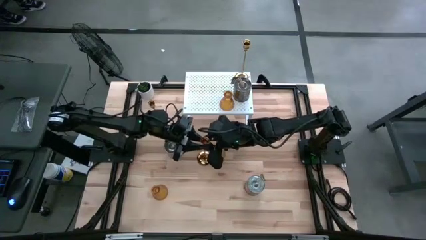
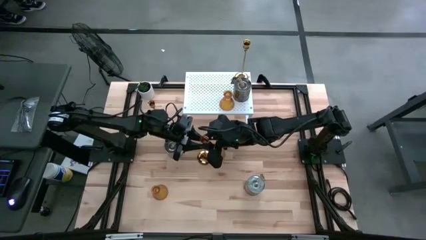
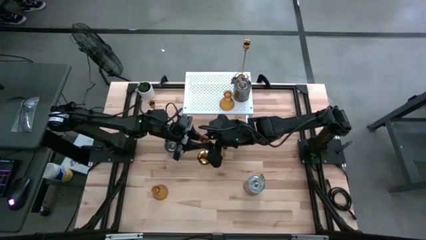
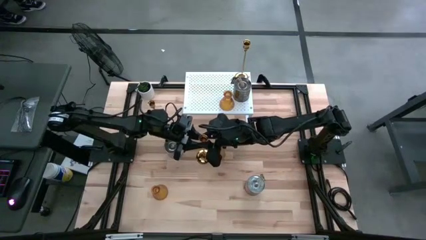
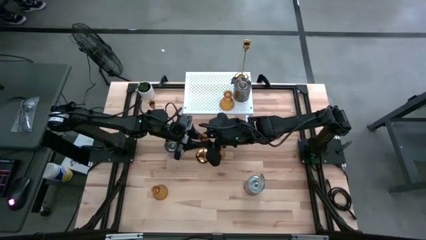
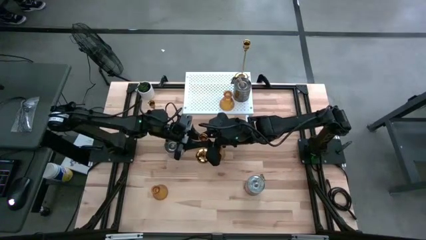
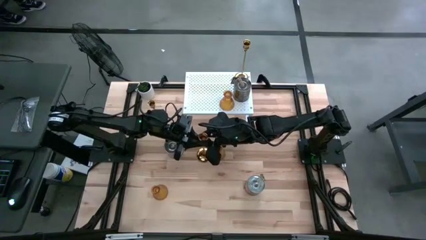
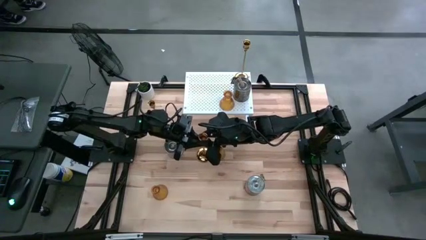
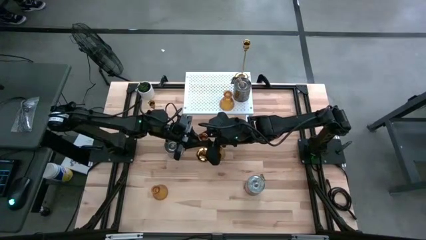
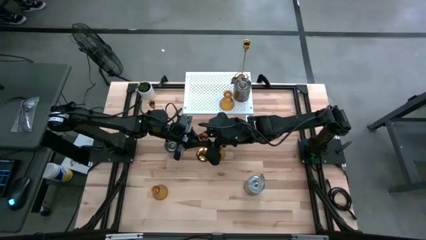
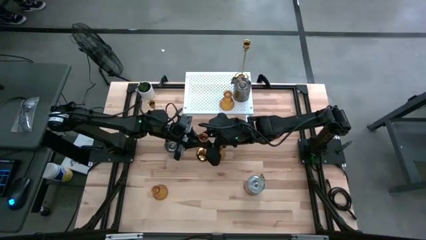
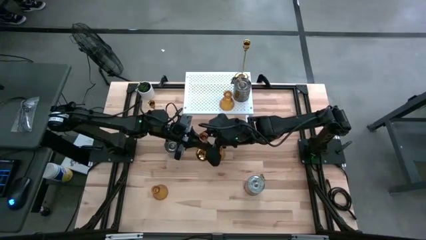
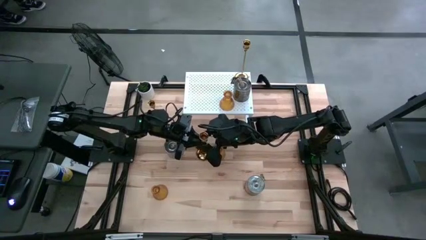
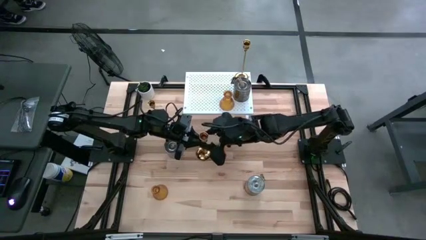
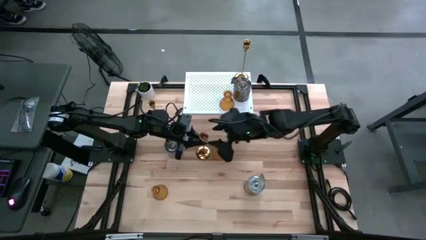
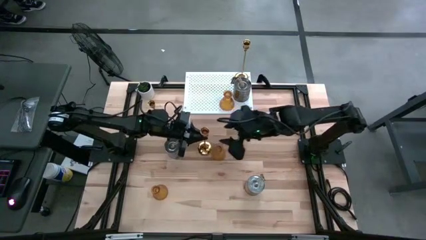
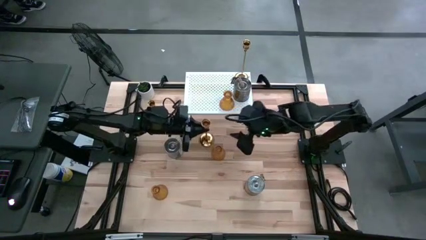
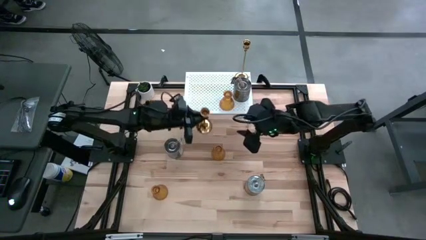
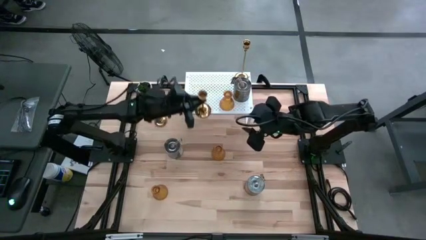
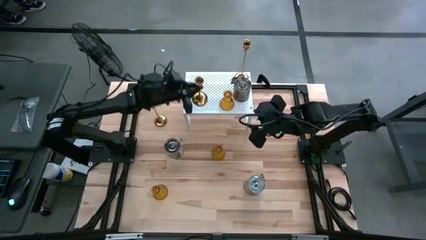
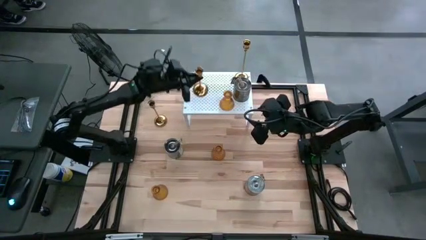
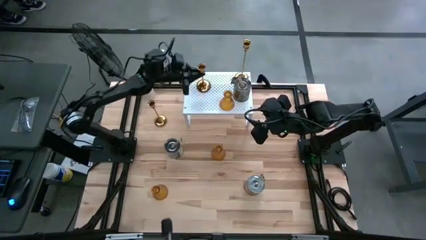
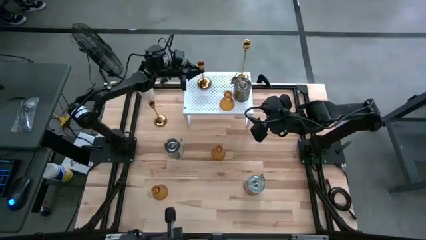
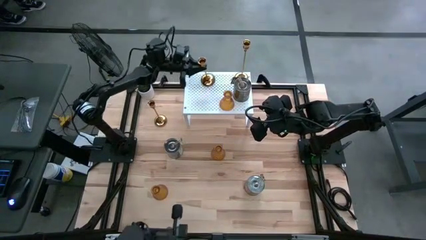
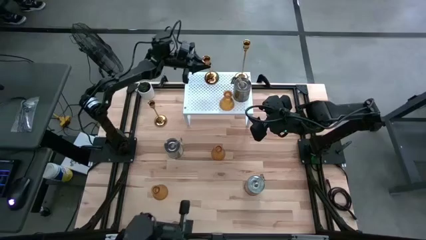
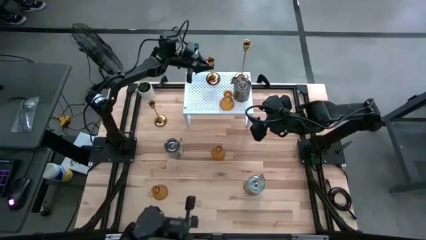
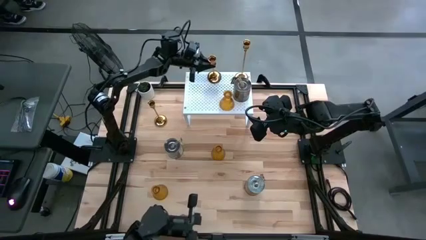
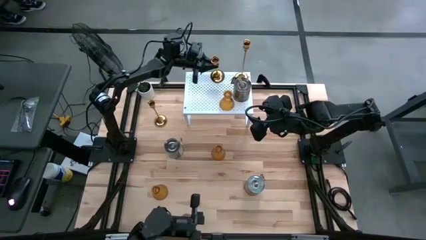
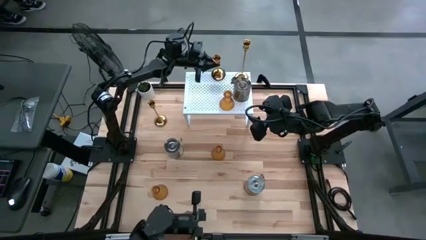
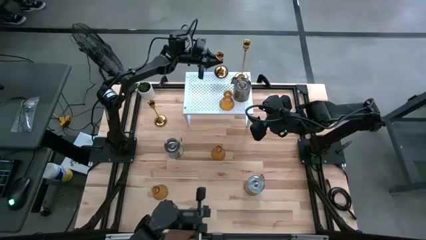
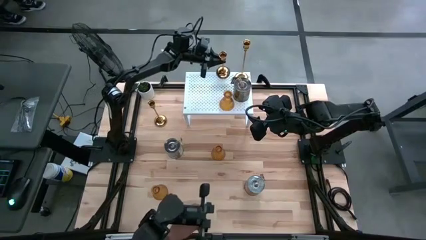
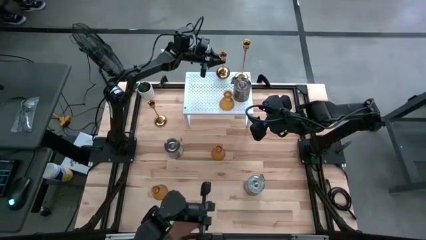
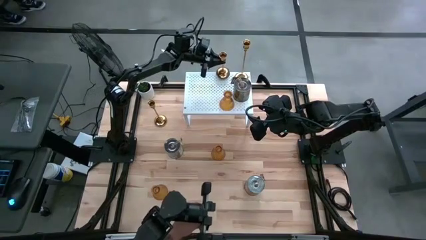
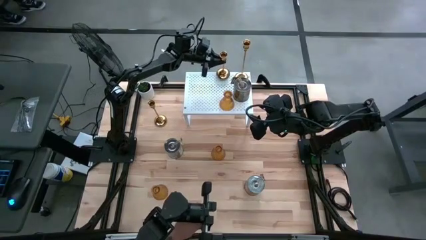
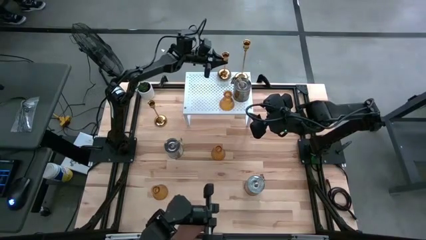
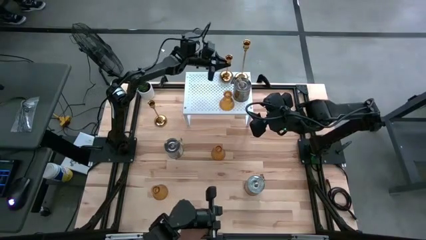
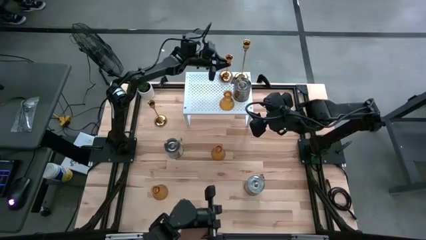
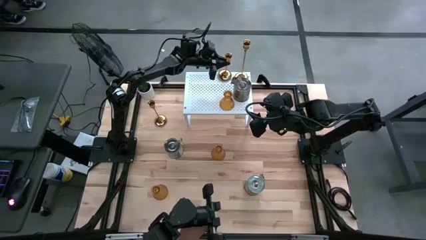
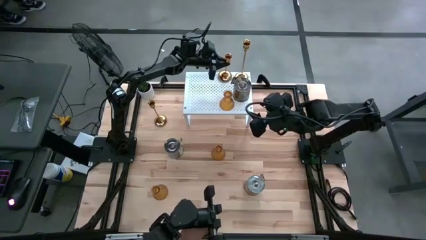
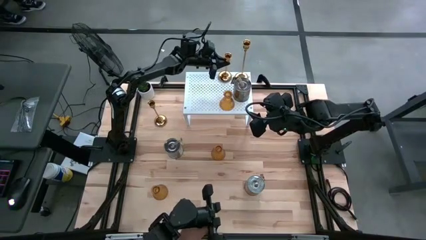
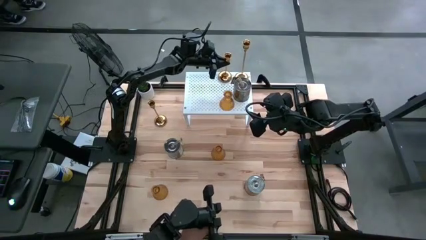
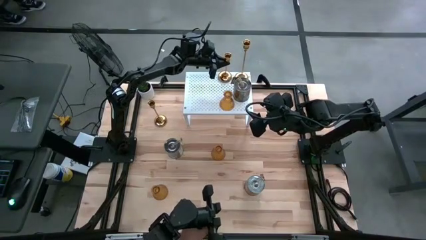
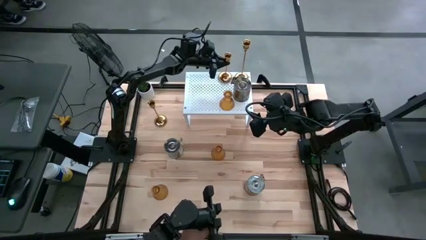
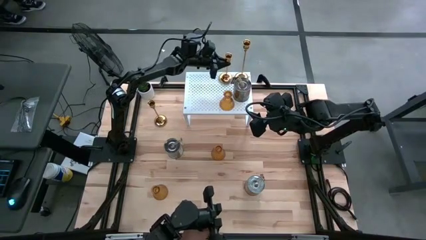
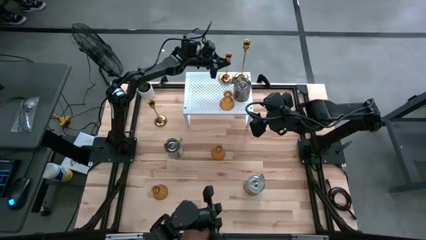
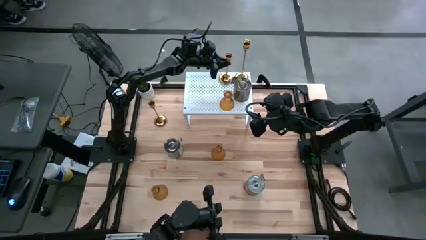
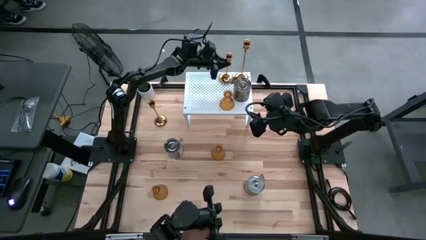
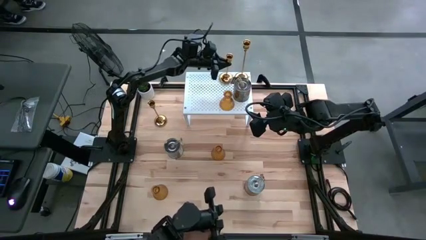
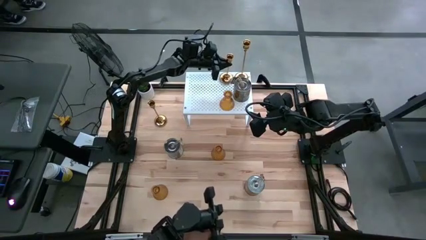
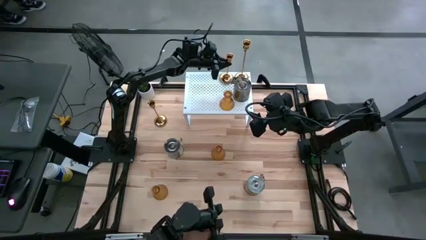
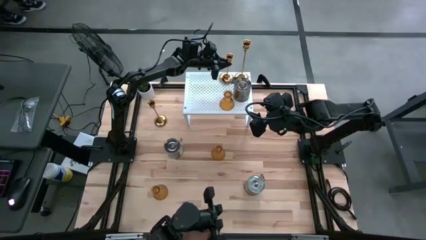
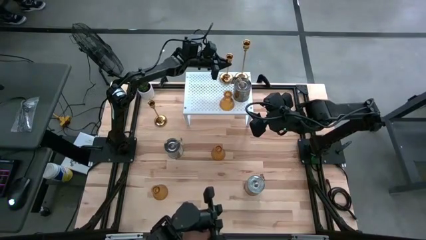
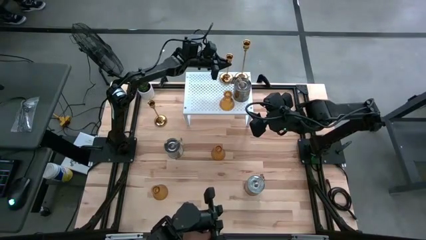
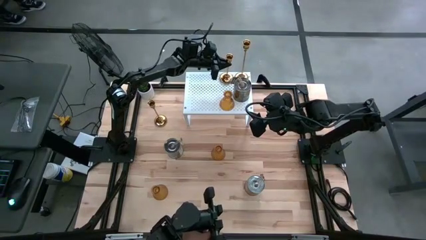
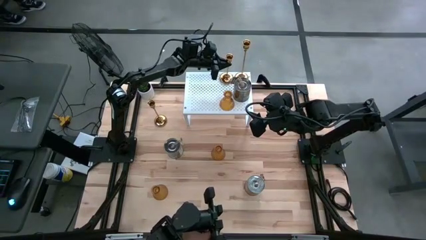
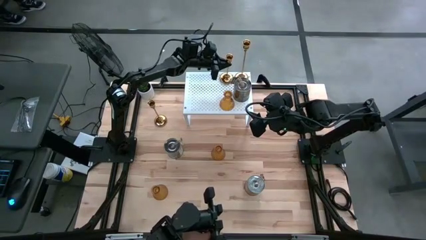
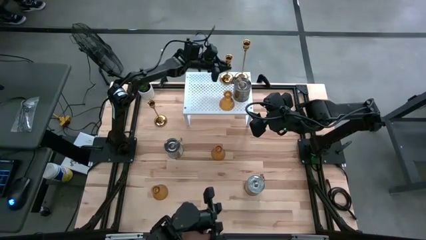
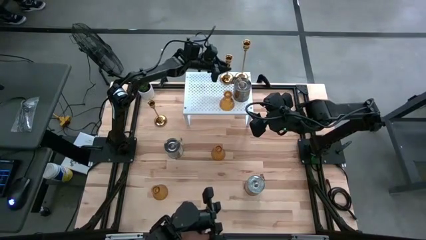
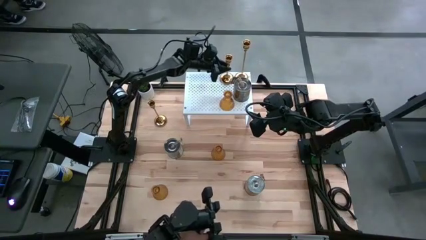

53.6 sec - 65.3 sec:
Task: Pick & Place candle stick holders
Put the bottom gold candle holder on the shelf

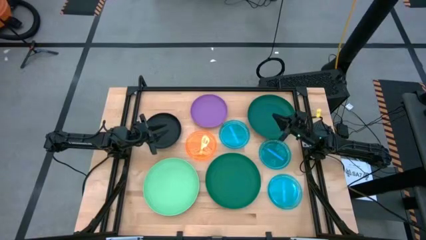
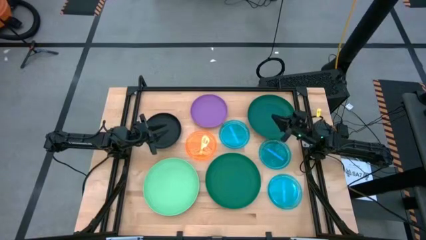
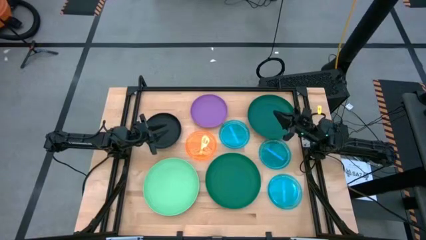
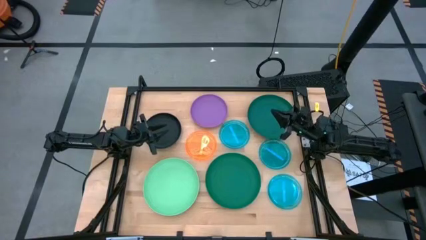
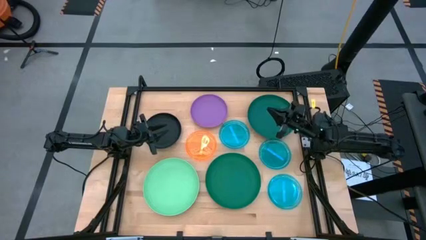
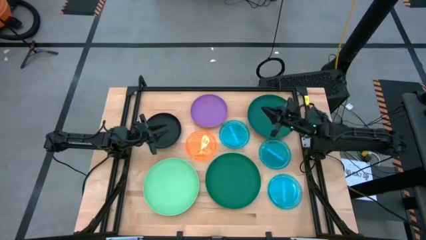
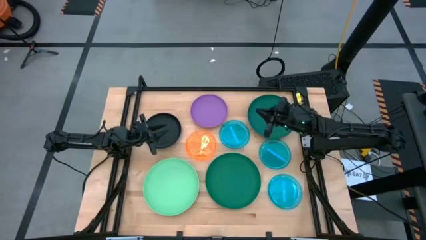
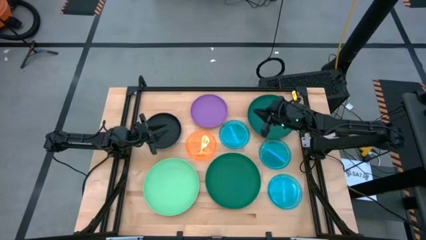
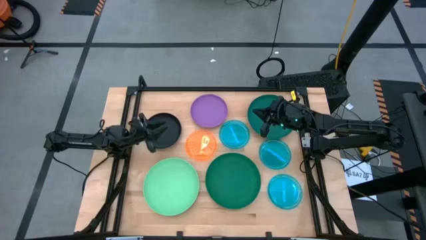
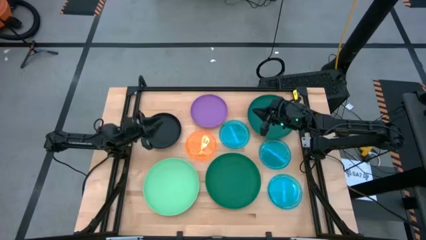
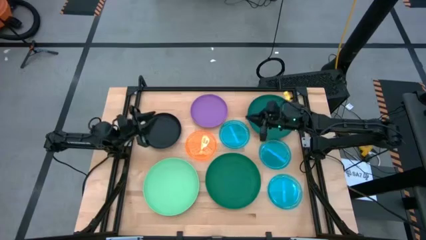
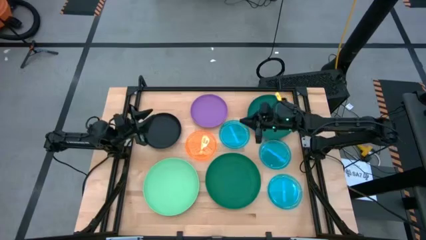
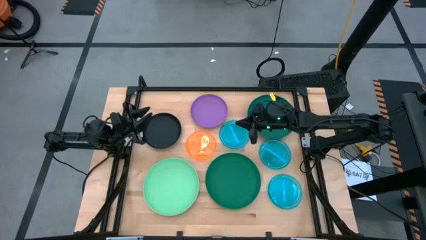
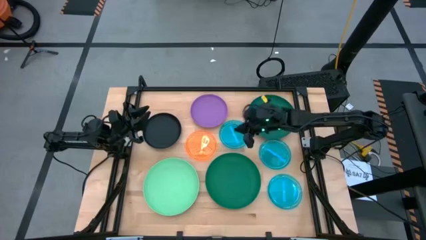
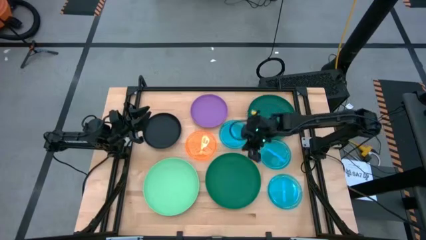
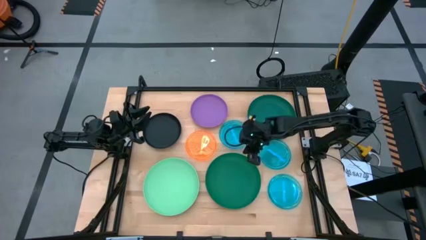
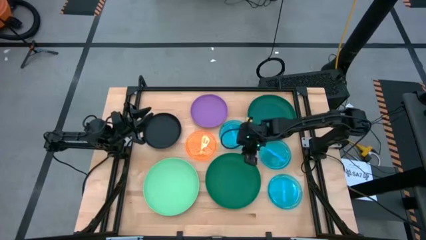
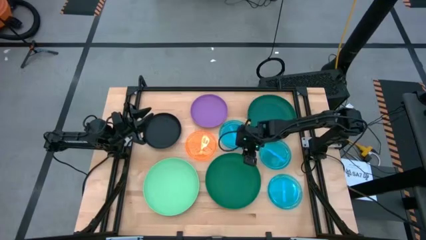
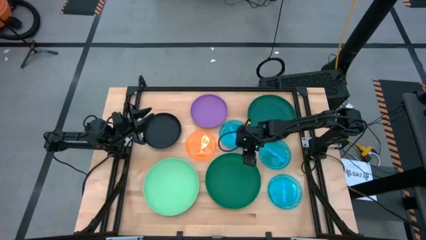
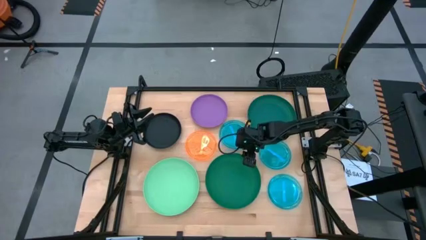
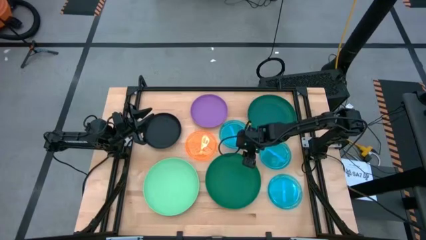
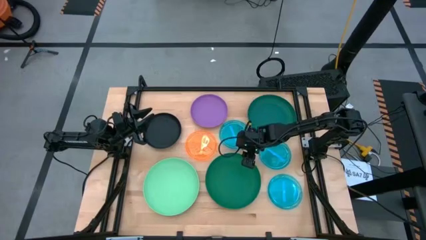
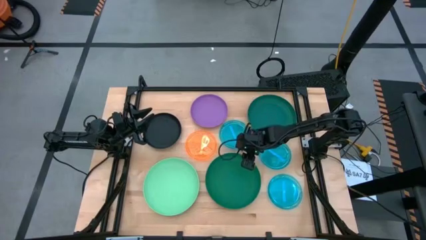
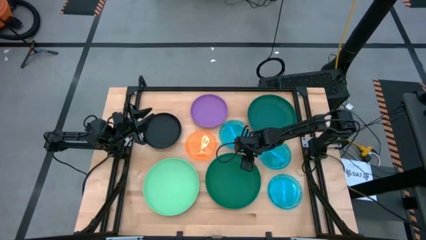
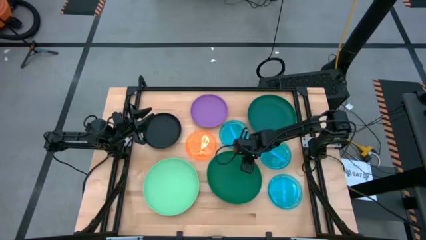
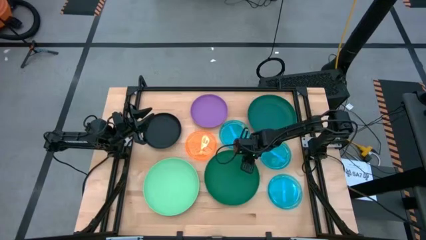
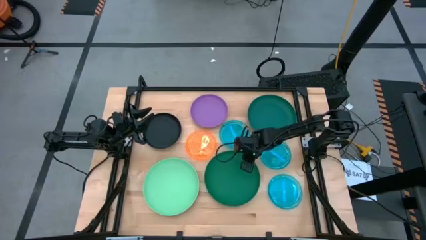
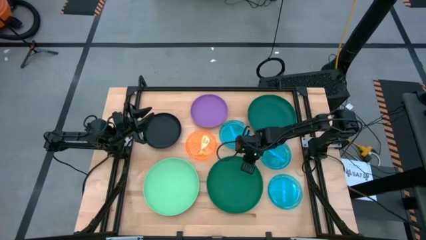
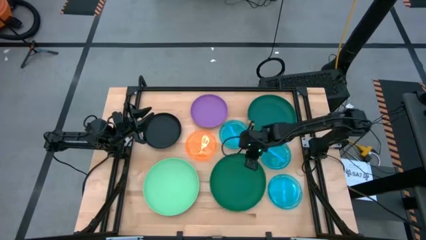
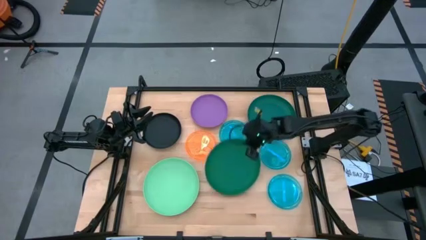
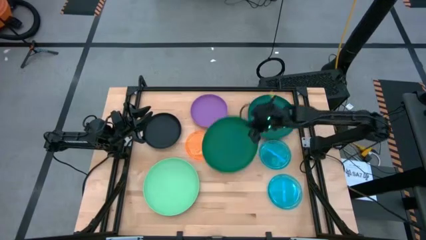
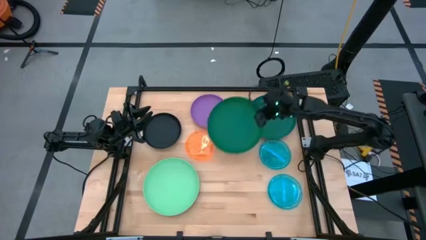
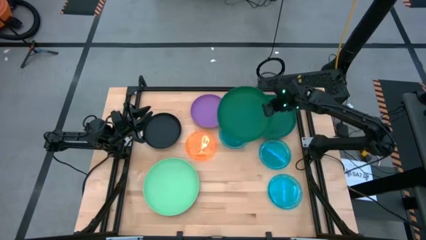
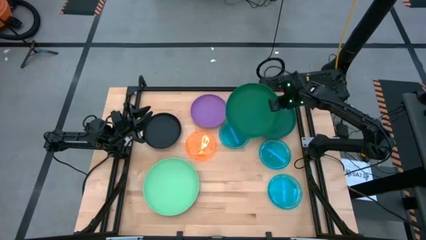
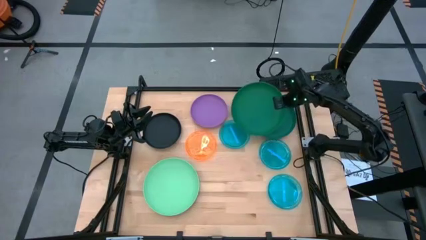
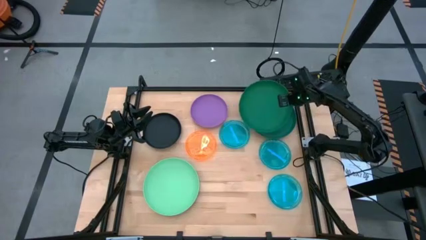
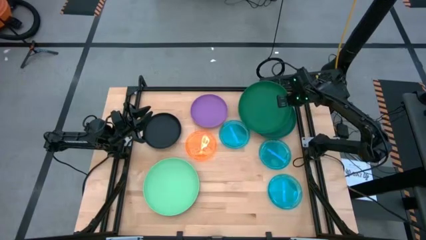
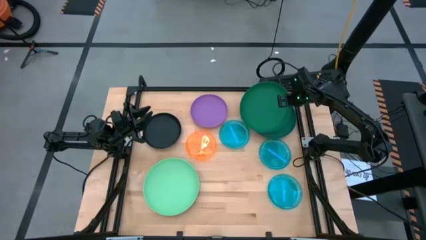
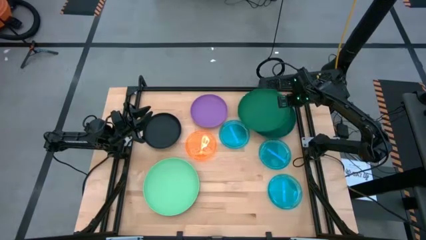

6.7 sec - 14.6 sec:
Task: Stack plastic plates
Stack the bottom dark green plate on the dark green plate
